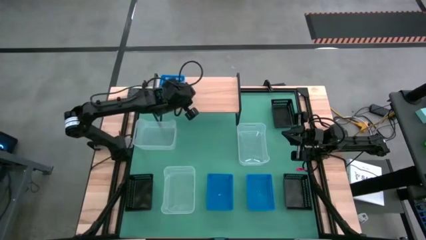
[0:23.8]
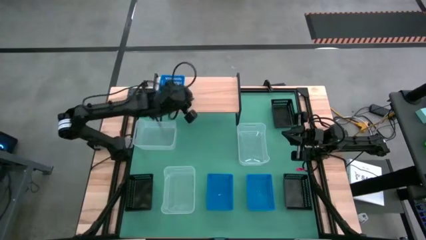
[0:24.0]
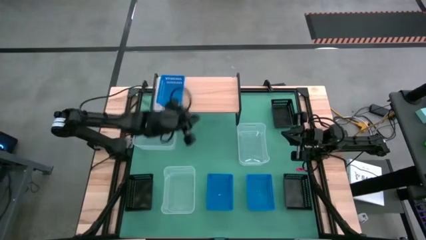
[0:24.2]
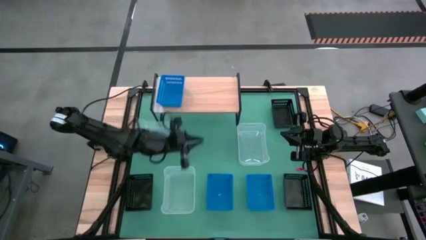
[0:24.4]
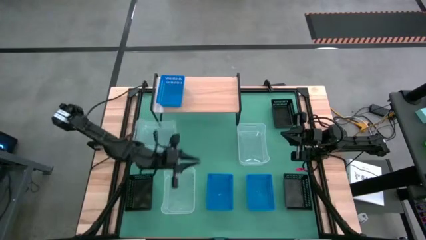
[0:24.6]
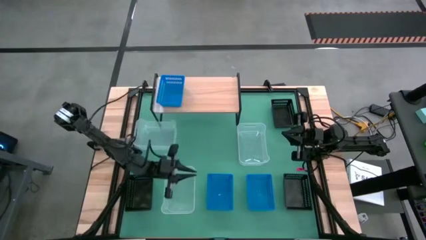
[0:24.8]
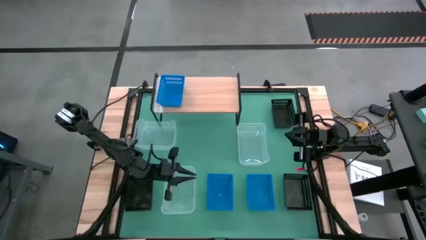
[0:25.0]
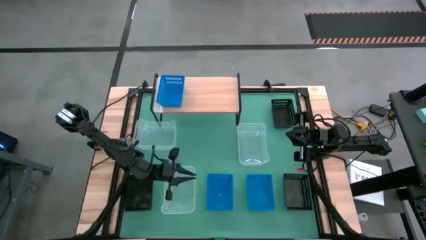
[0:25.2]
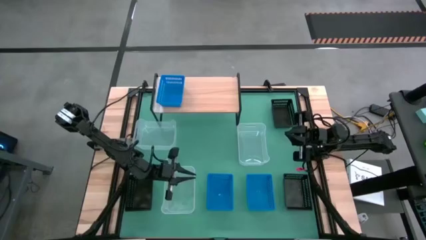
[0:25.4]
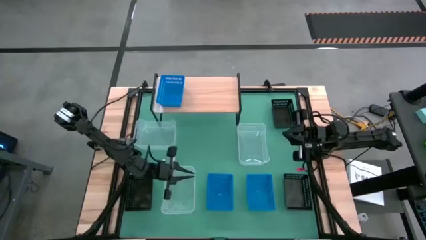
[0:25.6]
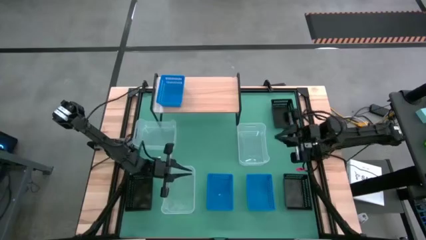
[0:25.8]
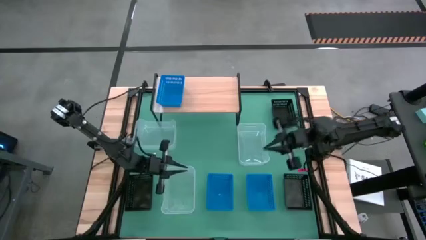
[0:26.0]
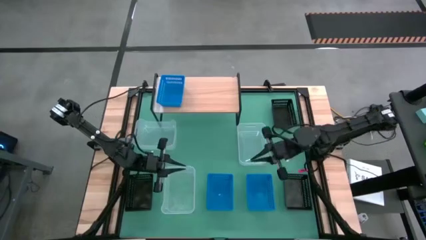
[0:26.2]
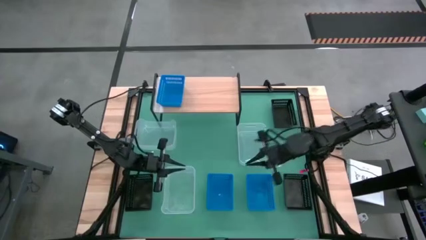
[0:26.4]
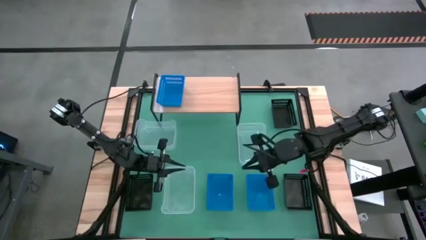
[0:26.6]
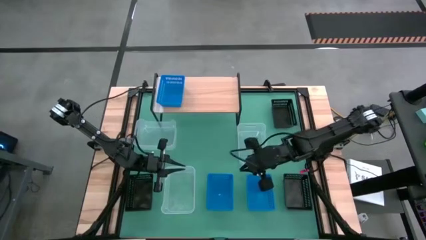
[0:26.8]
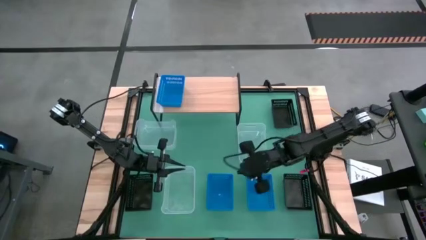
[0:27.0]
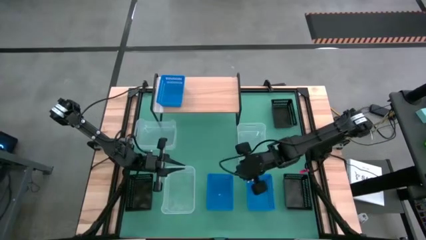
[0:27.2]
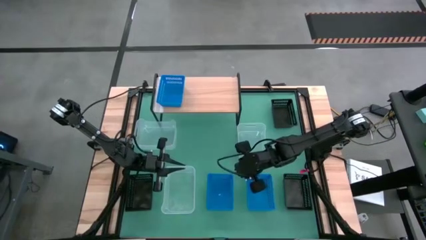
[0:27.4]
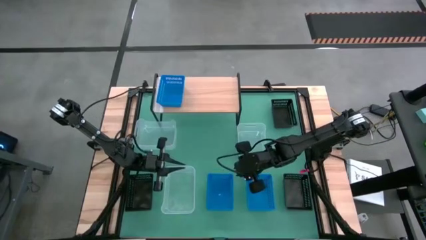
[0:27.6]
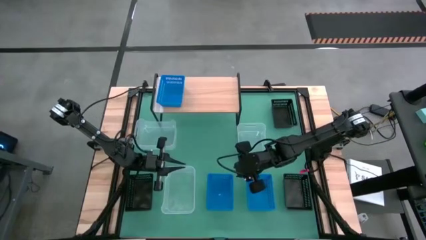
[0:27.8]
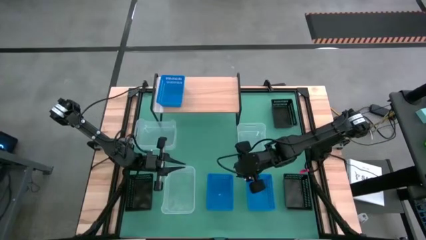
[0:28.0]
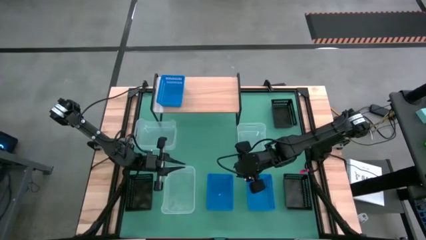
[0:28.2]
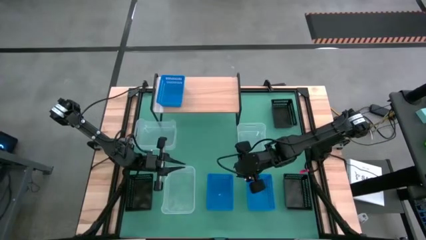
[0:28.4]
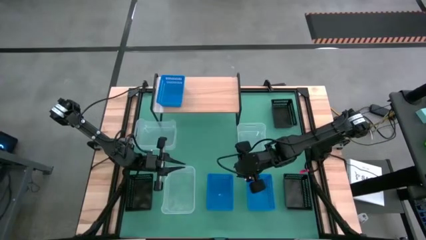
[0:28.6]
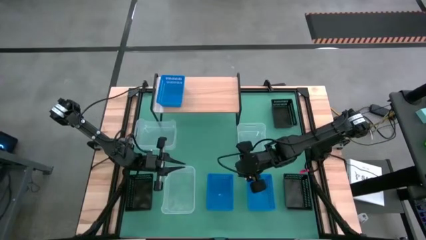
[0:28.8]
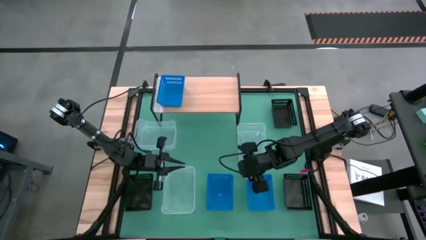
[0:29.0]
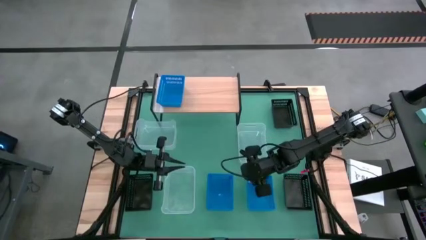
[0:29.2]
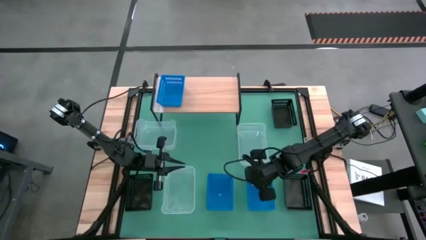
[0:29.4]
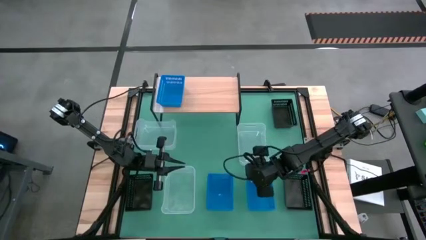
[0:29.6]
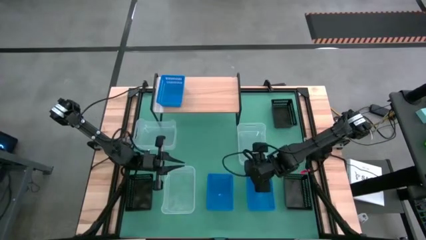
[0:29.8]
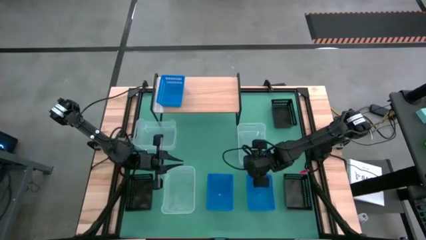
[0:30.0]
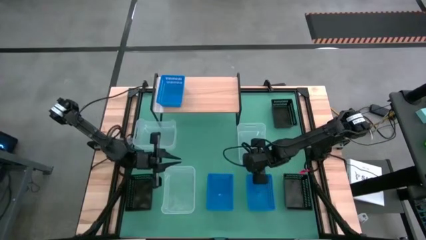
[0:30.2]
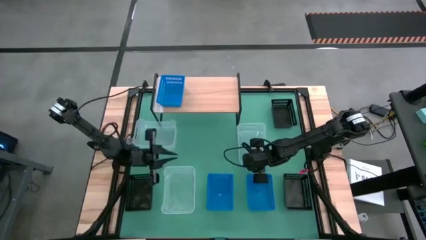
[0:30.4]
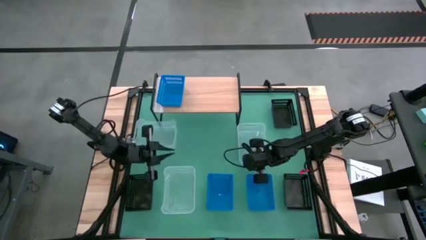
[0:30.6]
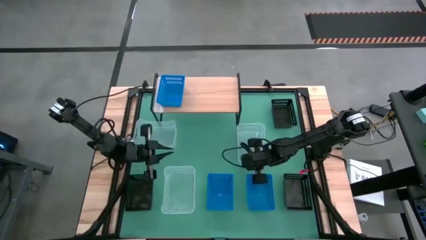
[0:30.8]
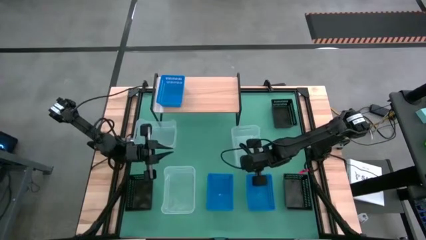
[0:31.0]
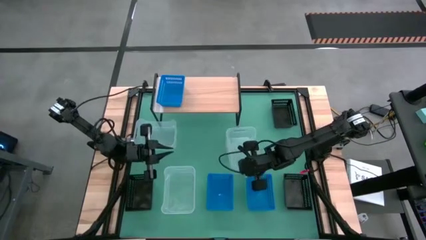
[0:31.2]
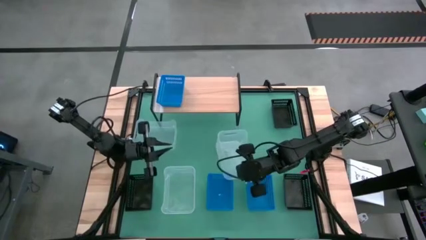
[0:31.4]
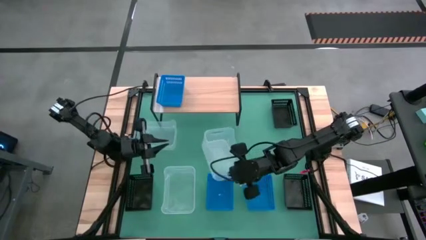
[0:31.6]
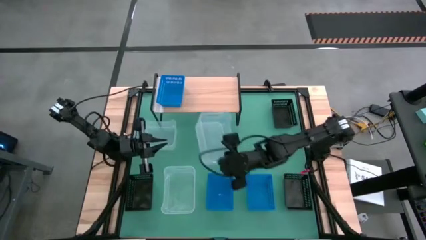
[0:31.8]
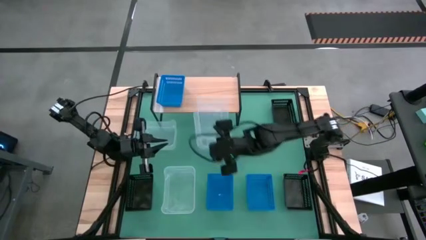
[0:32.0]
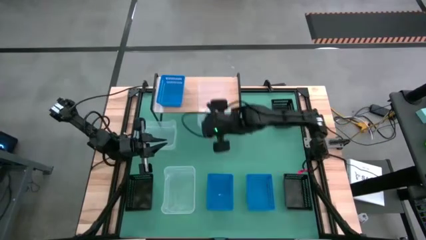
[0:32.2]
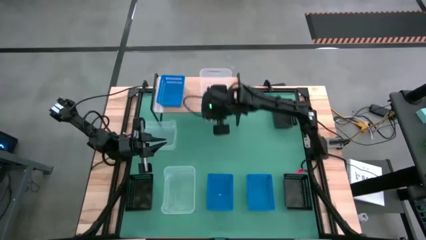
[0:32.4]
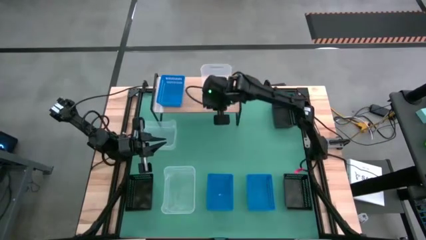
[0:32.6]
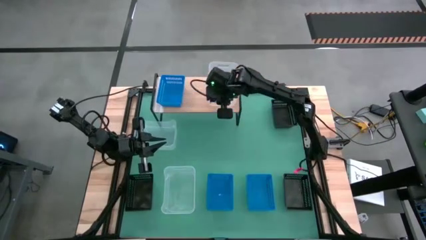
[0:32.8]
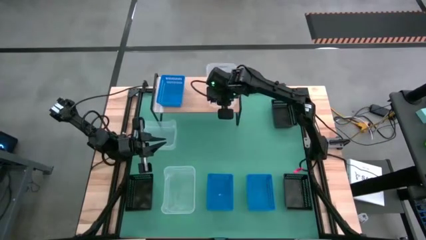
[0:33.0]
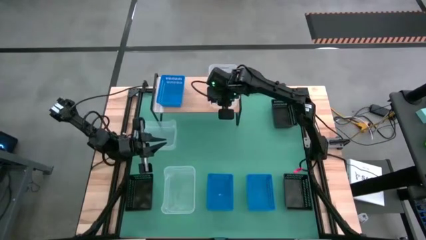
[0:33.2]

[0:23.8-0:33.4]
Task: Stack baskets on shelf by color
Put the top right transparent bin on the shelf

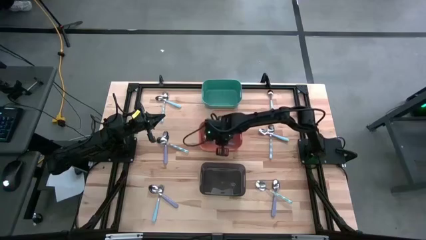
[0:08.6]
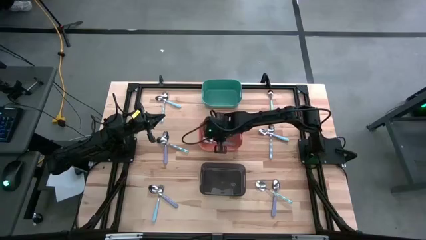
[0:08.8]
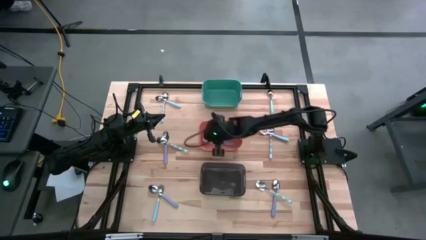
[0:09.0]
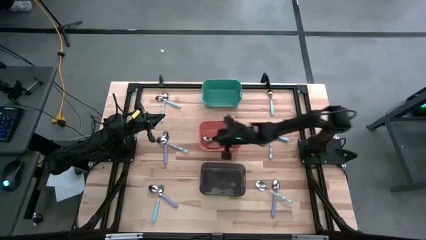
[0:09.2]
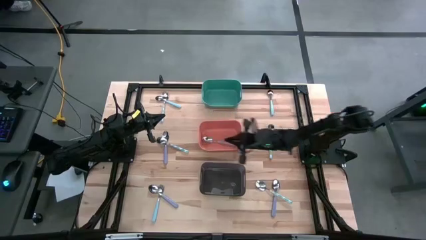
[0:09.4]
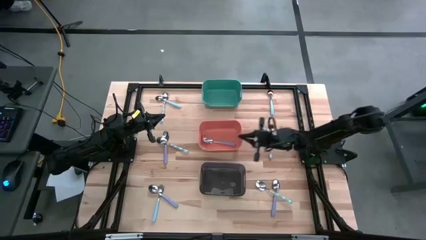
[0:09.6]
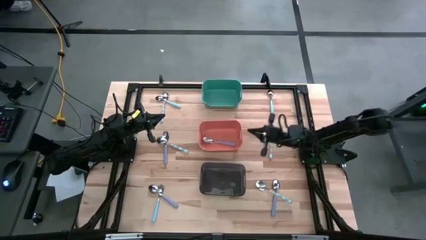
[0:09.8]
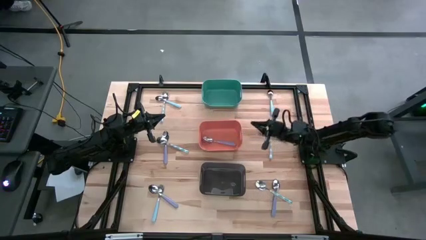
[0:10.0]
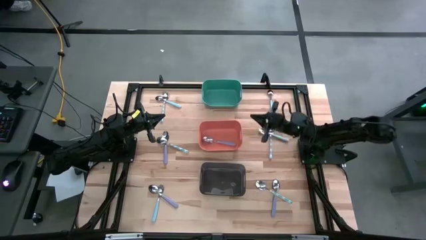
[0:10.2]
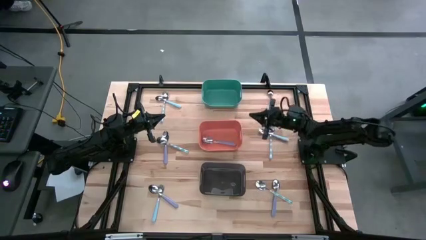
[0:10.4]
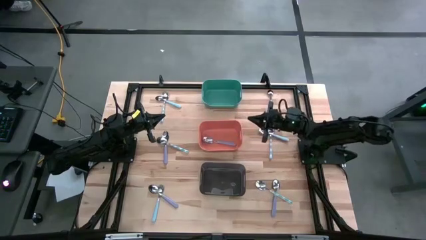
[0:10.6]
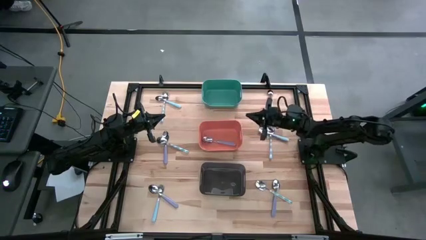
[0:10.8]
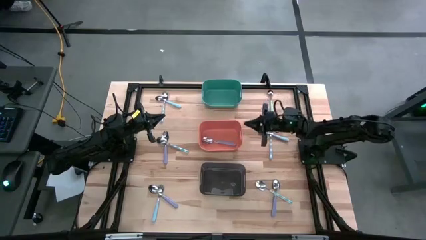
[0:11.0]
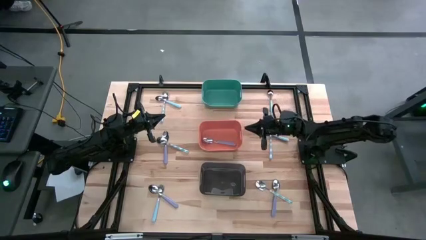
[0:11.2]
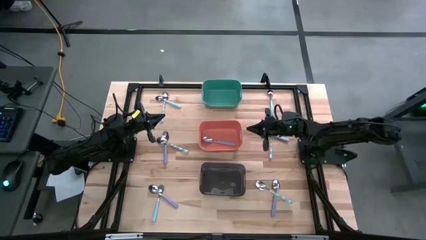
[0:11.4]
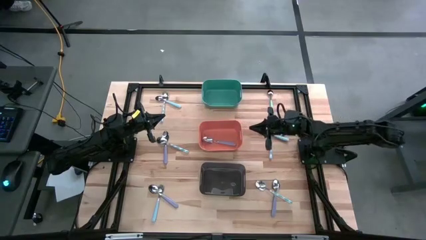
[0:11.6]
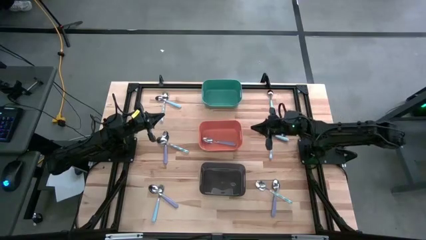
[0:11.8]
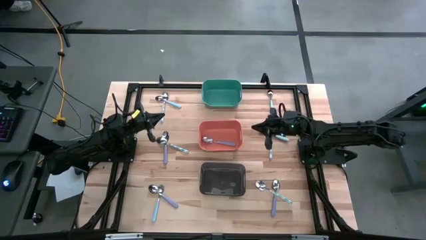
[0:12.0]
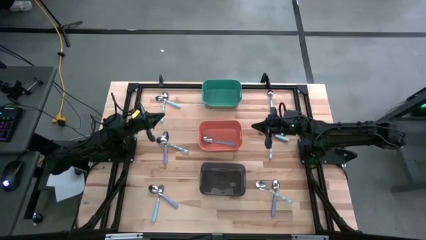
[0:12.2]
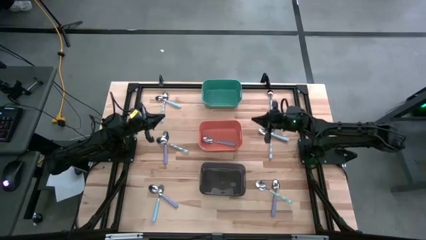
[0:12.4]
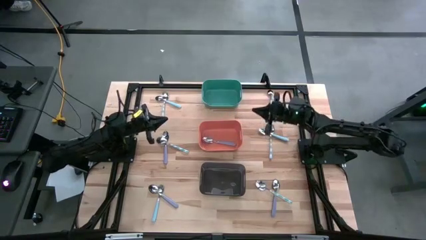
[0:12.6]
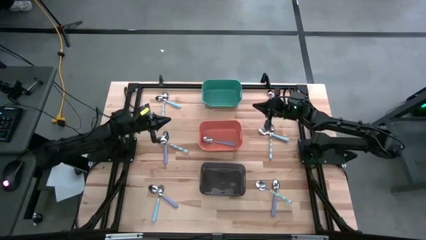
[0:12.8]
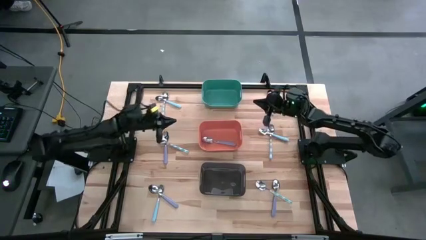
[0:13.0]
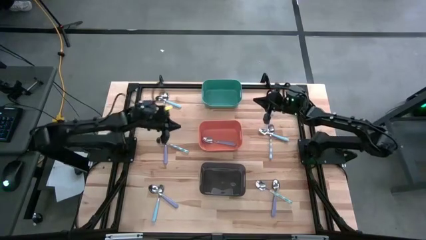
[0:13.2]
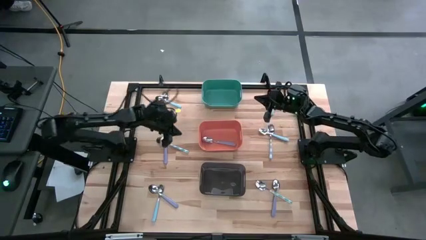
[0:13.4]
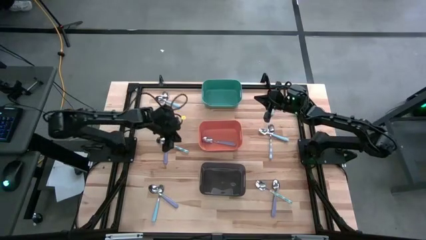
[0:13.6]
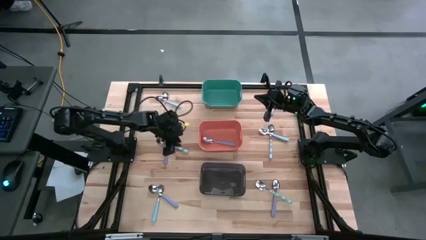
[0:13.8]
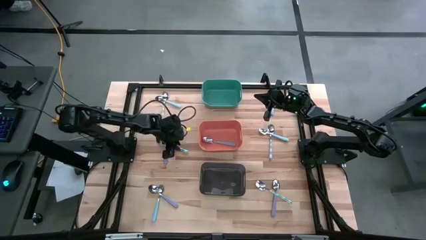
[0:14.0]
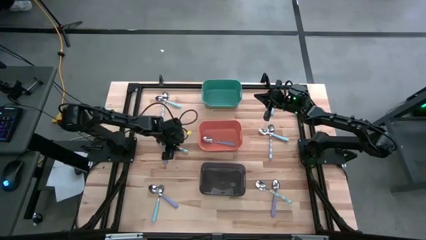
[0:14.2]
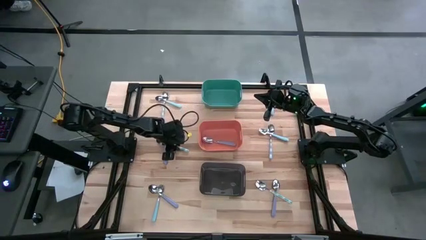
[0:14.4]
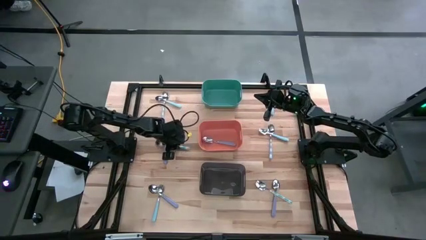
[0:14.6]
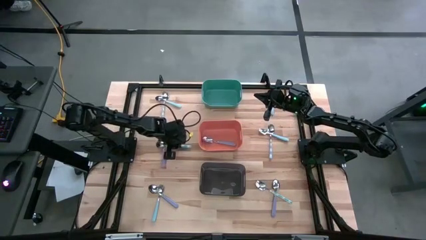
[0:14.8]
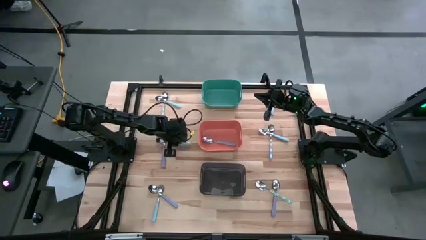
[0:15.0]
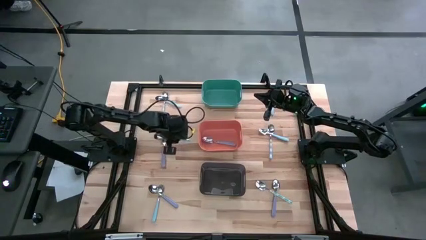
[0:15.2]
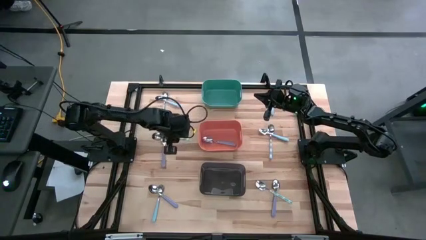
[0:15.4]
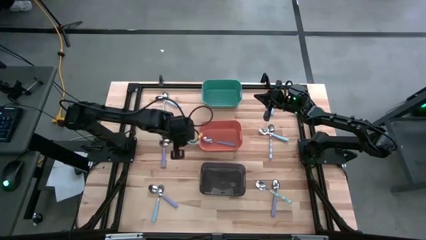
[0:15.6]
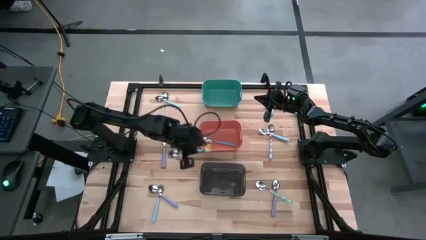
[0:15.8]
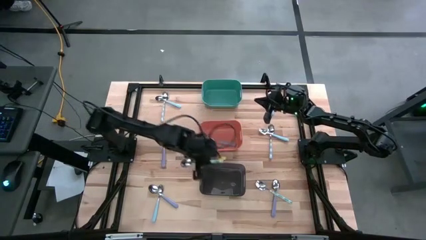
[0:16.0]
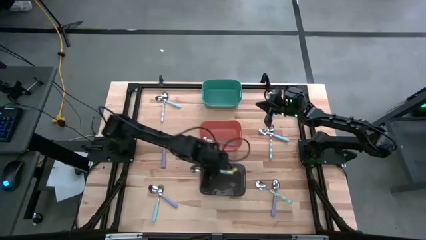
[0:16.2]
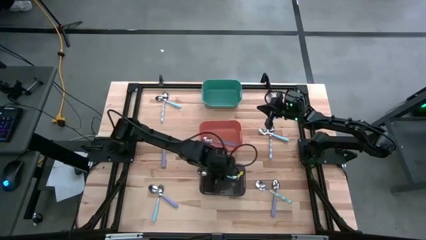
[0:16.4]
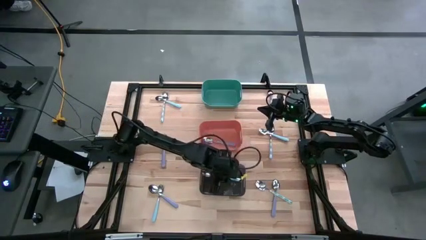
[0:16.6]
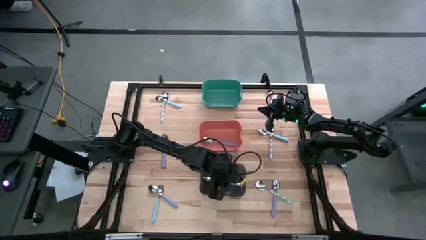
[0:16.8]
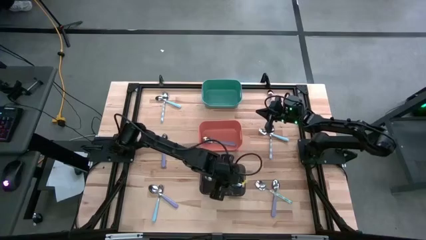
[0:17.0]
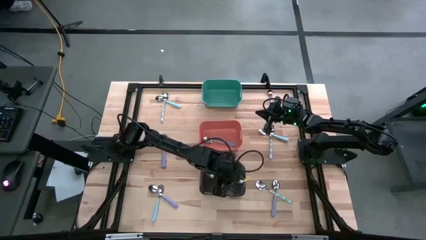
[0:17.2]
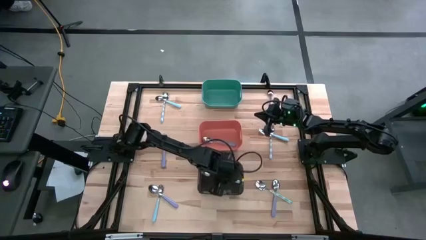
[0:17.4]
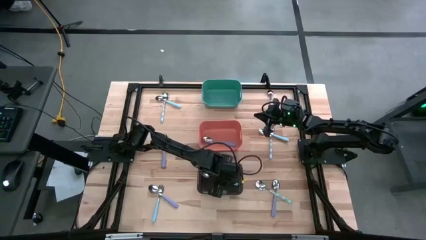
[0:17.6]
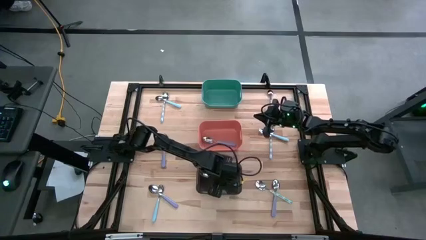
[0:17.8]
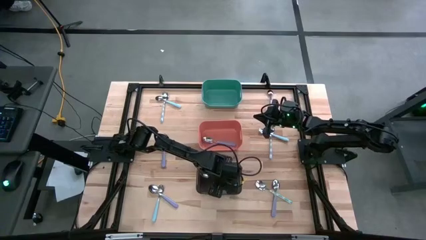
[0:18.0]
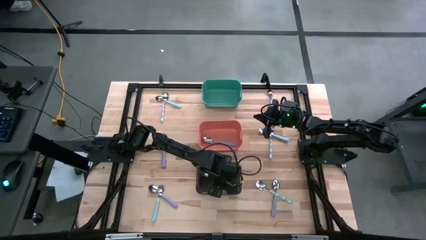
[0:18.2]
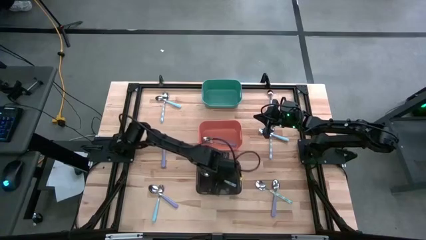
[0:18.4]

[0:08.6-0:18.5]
Task: Sort silverware by color (type)
Put the middle left white patterned spoon into the black bin
